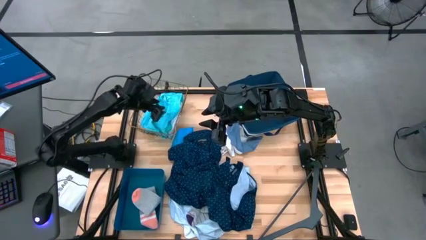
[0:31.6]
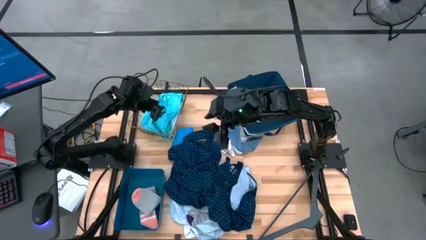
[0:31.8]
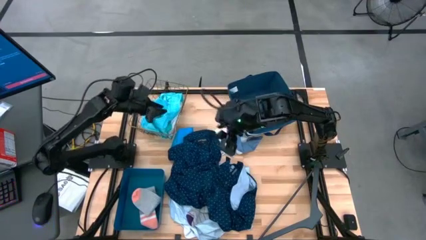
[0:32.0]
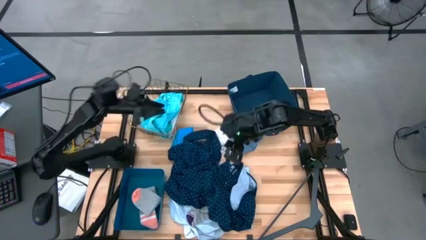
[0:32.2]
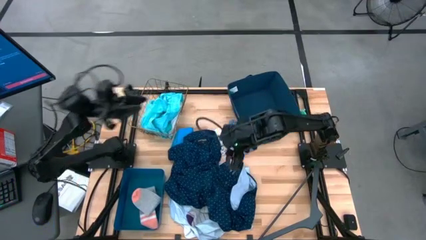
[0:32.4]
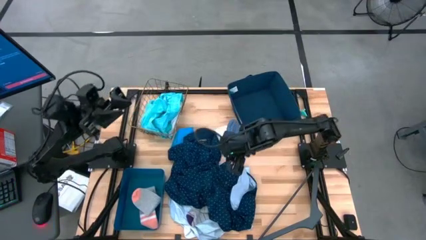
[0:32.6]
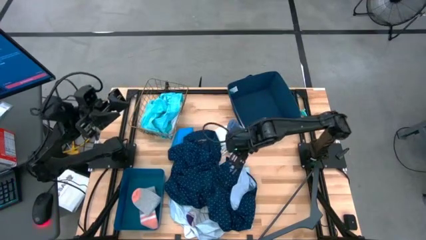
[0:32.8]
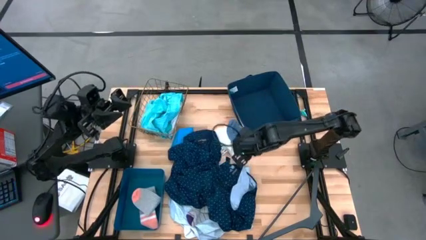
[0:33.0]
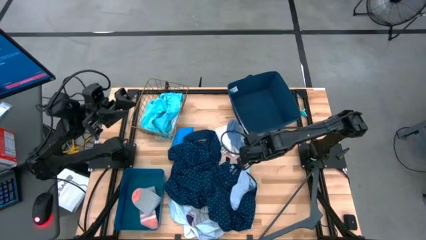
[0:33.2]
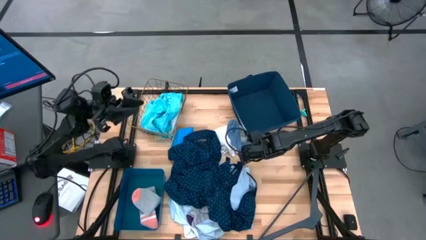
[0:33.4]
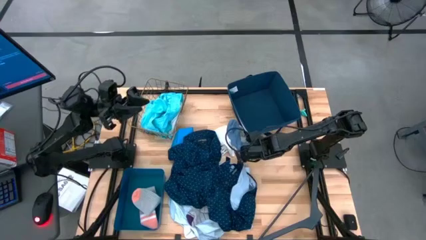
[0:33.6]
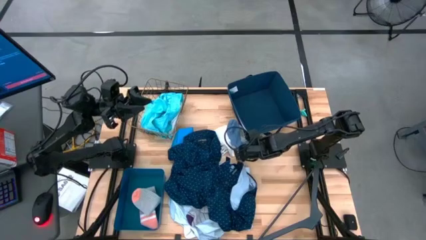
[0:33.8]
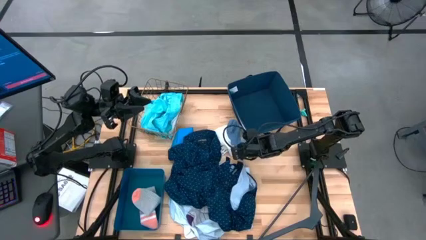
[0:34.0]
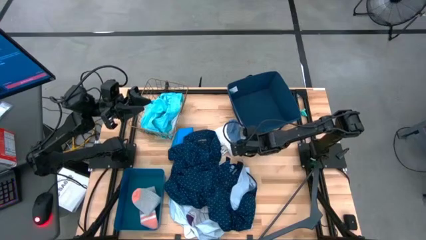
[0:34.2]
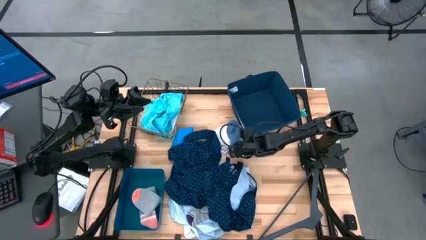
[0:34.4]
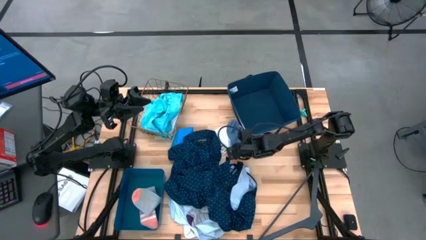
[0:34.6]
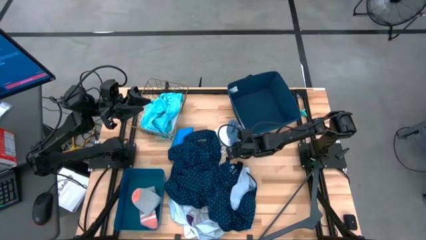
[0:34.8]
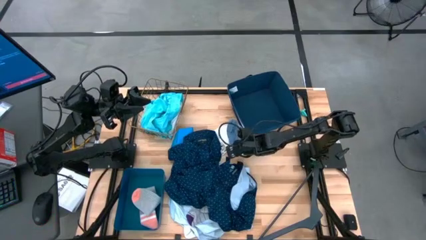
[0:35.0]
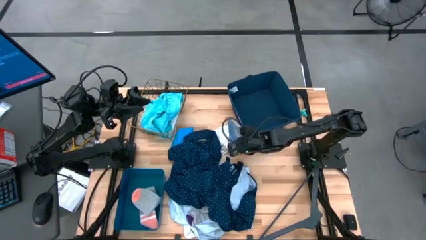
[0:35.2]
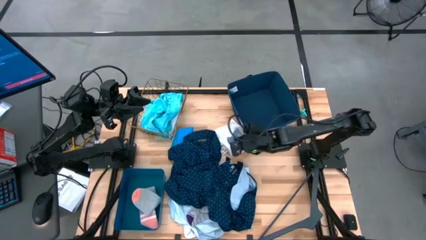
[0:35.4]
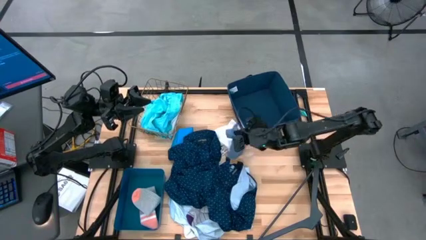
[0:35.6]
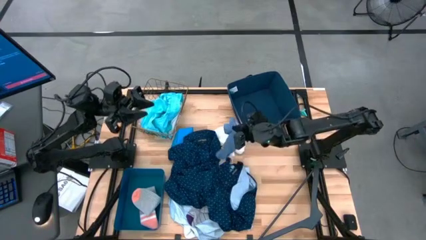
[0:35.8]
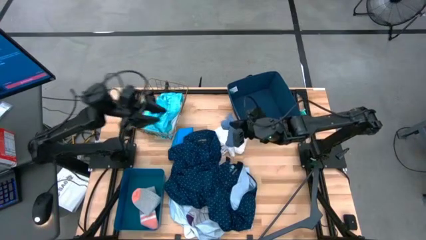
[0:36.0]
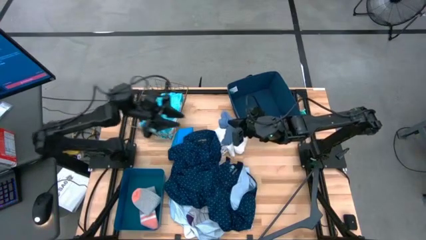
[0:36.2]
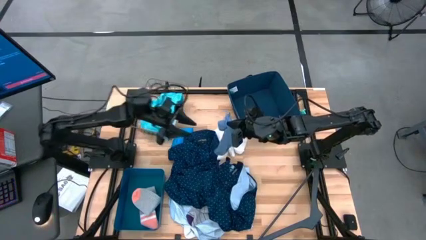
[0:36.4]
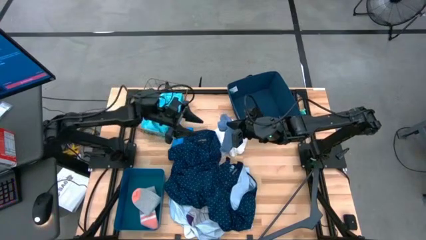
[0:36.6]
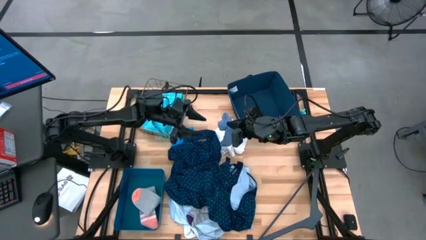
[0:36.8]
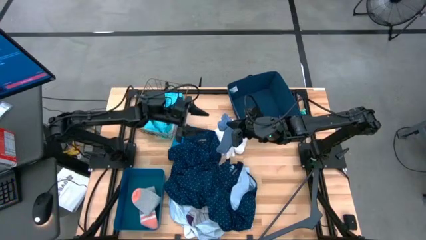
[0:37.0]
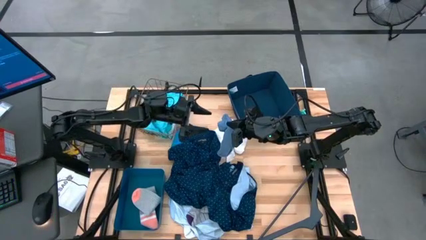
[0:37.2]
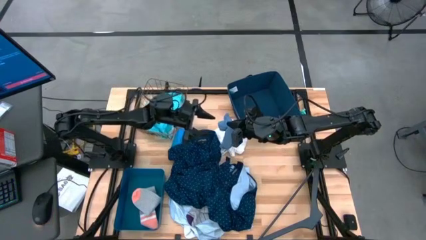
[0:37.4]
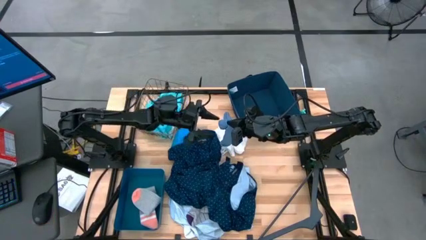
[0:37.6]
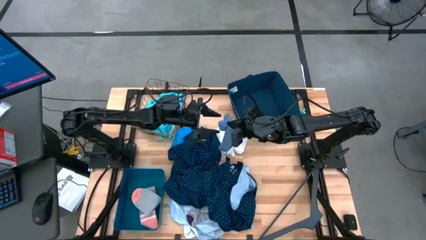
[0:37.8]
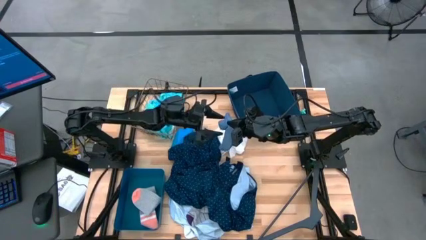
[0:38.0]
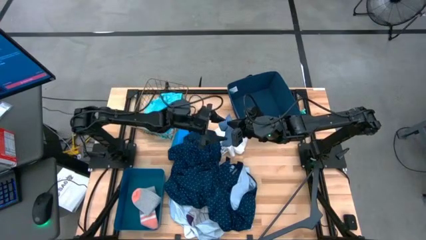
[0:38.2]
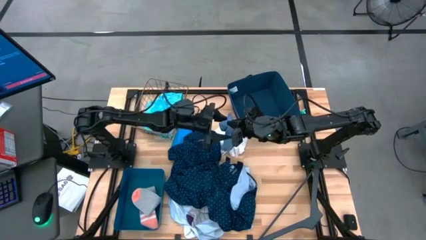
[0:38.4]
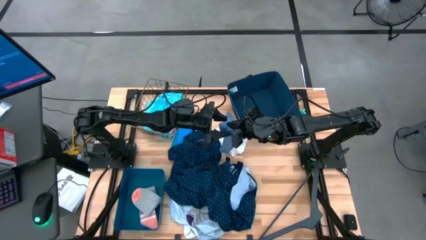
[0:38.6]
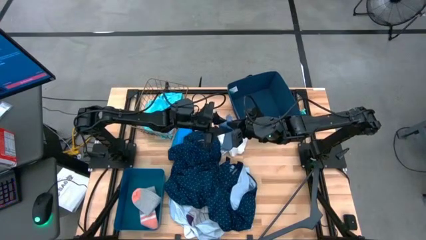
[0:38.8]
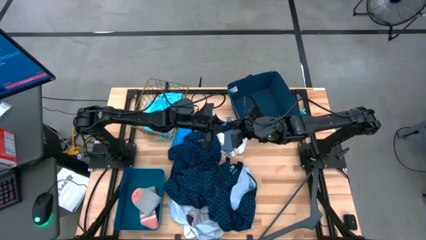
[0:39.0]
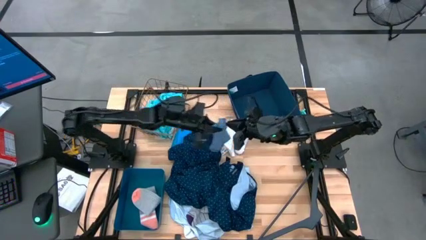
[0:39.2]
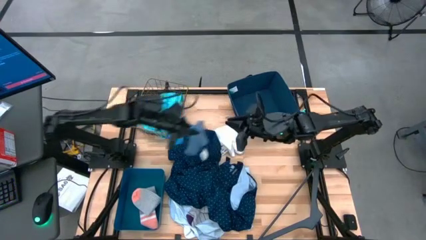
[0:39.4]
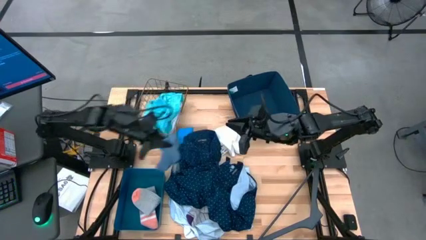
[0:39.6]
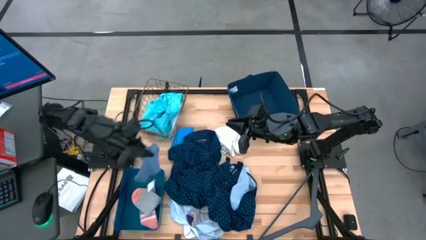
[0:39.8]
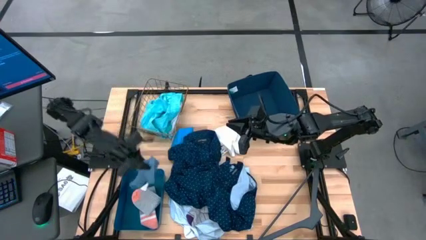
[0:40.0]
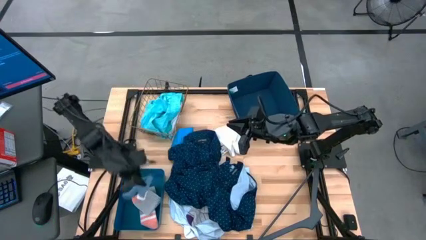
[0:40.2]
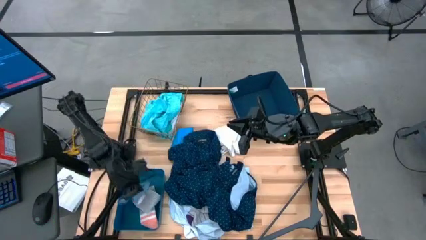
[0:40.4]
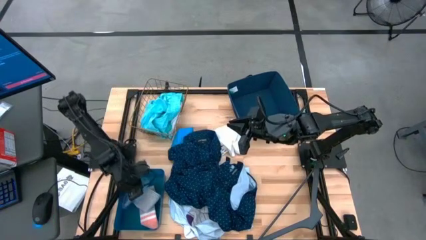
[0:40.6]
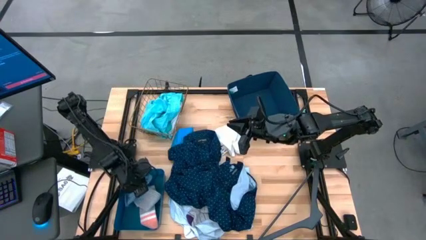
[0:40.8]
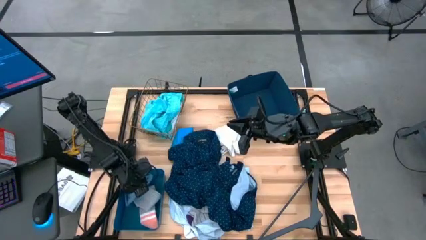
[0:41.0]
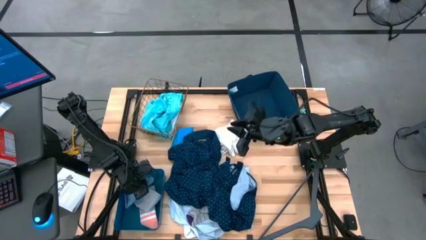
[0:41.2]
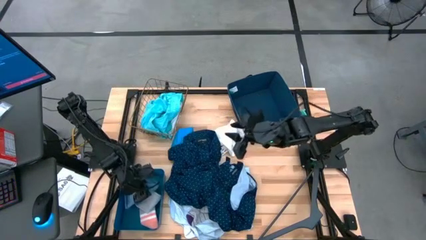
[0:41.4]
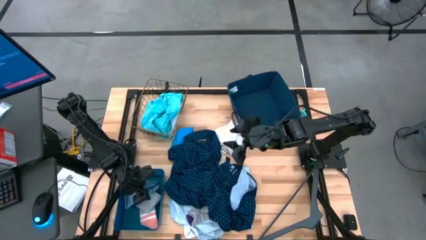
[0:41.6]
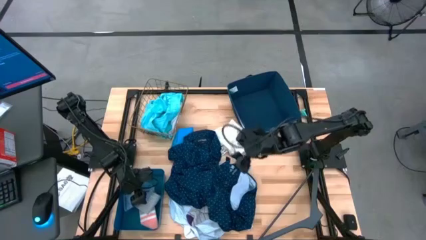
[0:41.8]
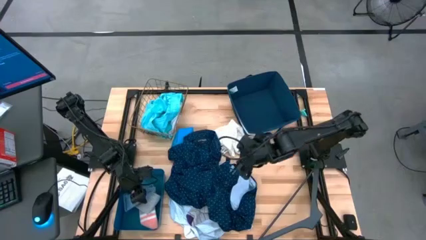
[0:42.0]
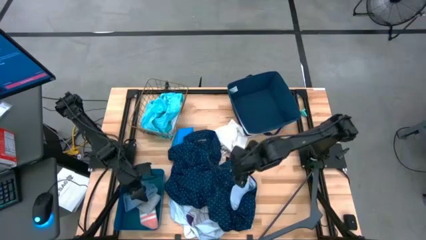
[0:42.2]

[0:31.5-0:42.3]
Task: Pick & Place Cloths
Put the blue sock into the blue bin

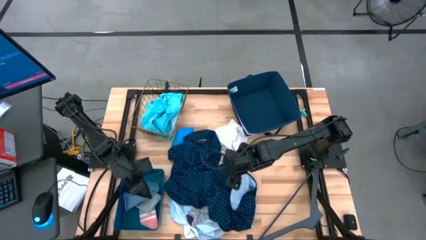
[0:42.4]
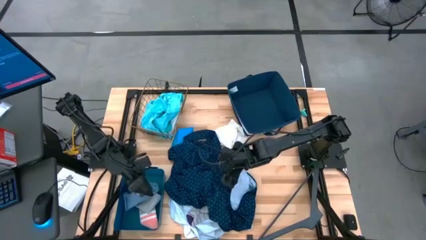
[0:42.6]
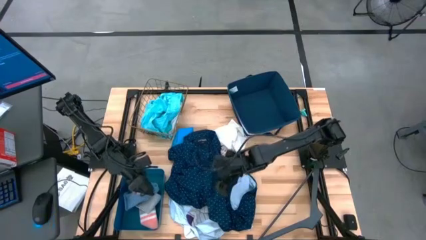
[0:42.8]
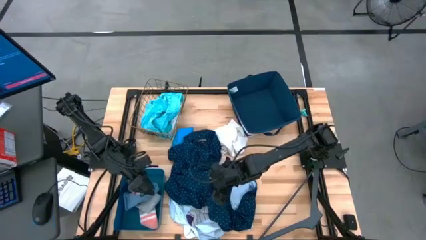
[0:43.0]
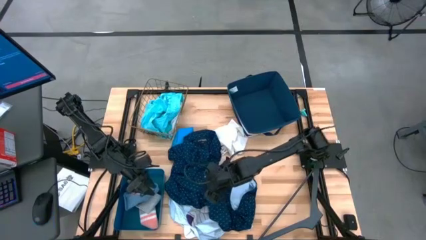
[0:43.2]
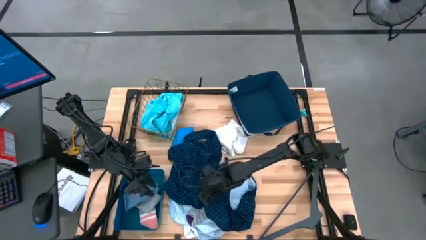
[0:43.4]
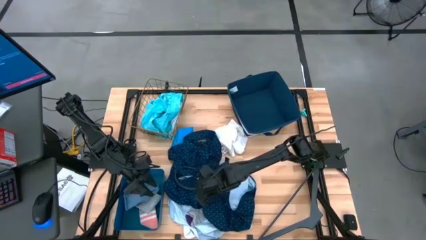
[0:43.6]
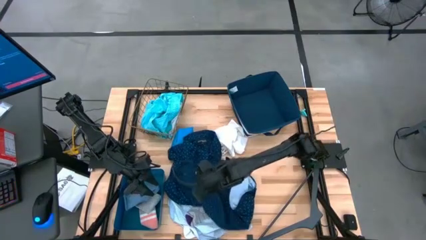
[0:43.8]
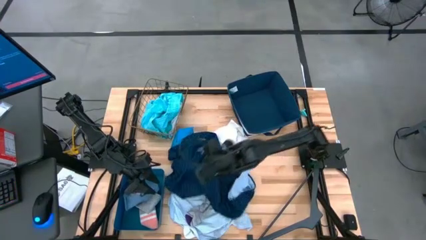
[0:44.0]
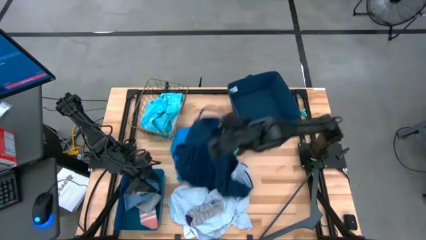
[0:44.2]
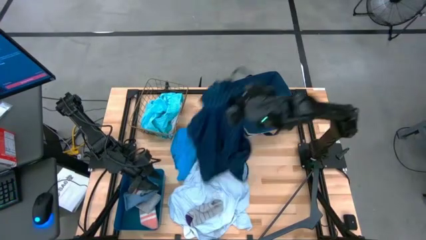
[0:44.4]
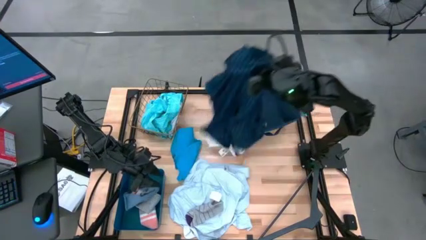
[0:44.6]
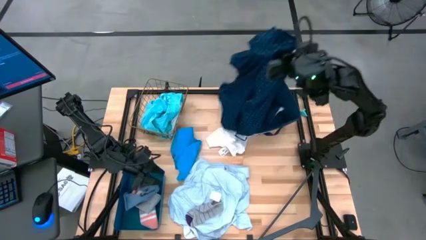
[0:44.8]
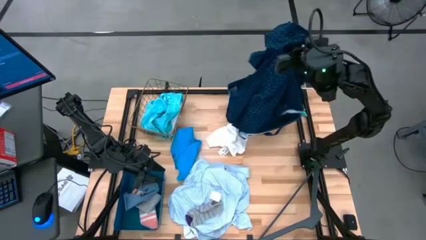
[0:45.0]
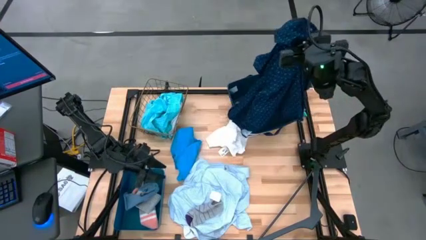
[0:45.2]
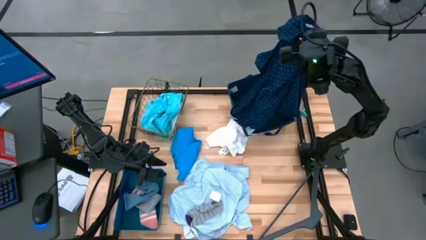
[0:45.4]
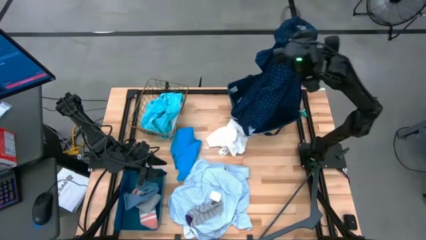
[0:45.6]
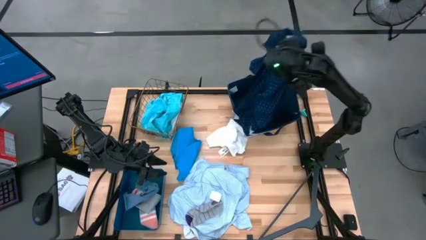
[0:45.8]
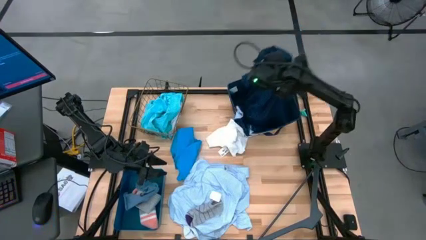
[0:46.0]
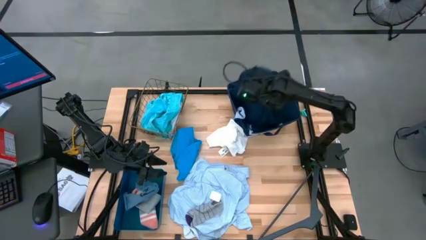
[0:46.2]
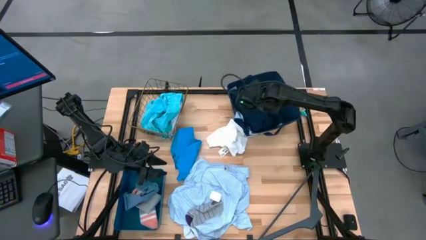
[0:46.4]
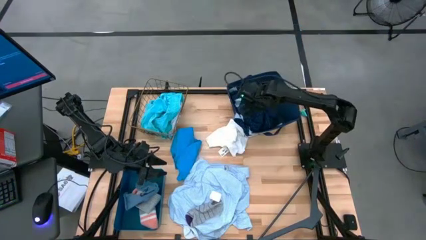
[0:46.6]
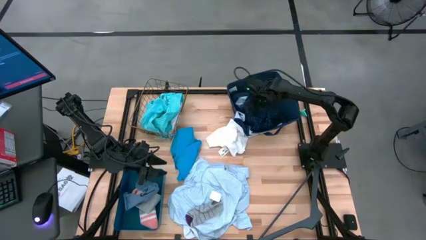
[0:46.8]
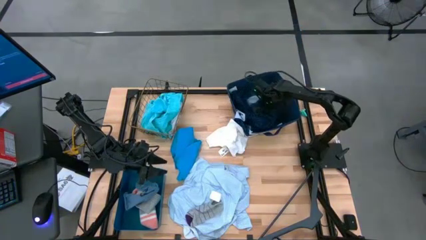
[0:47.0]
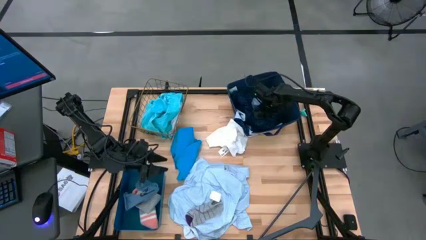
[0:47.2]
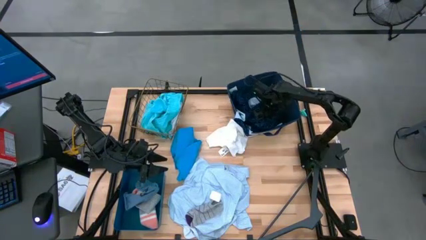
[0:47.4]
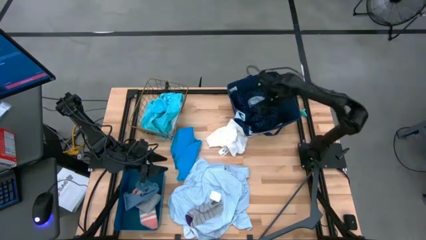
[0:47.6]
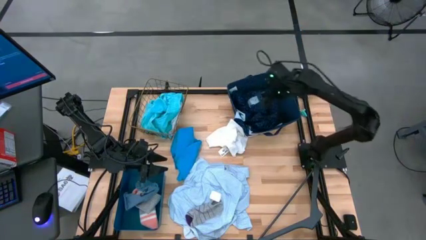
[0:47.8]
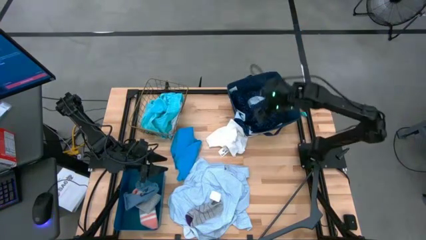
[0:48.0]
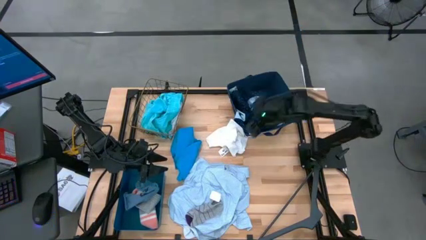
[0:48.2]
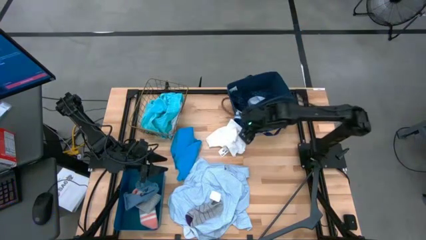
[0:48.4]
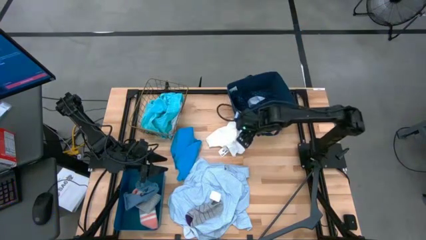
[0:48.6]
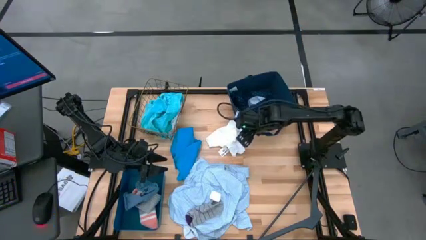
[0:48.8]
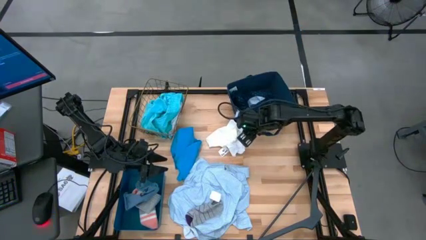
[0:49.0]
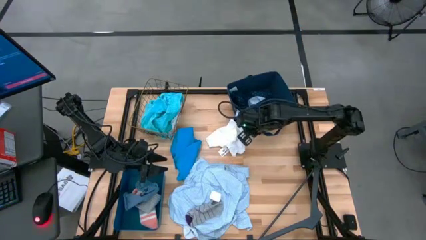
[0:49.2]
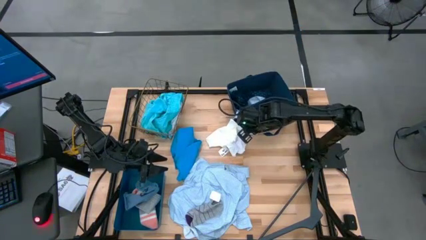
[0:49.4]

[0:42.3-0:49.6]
Put the dark blue polo shirt into the blue laundry bin
